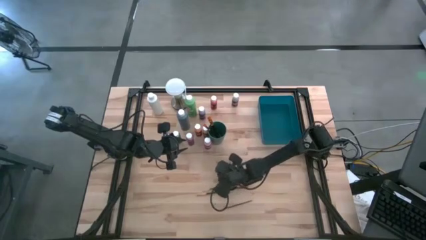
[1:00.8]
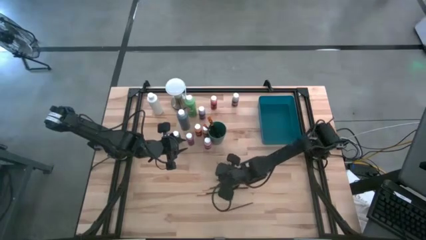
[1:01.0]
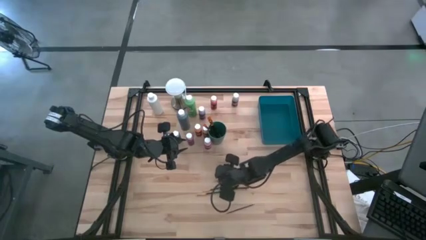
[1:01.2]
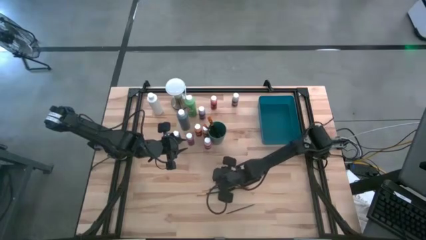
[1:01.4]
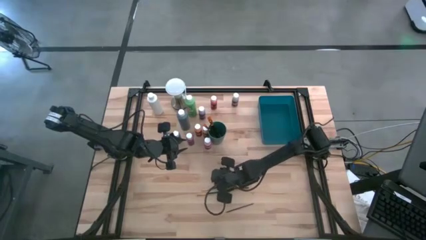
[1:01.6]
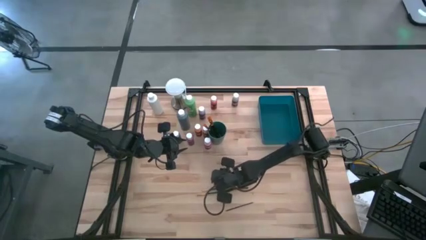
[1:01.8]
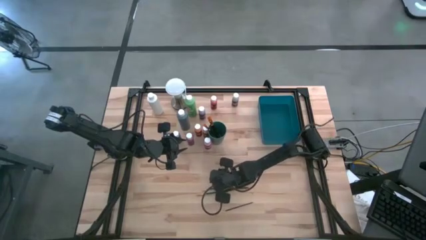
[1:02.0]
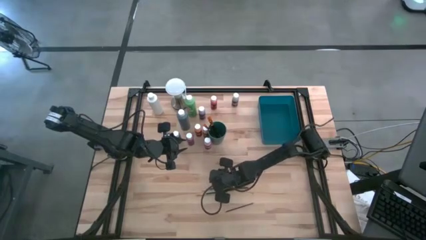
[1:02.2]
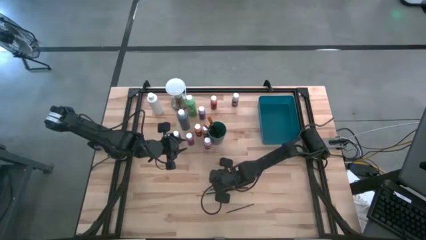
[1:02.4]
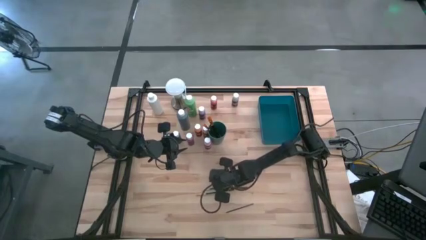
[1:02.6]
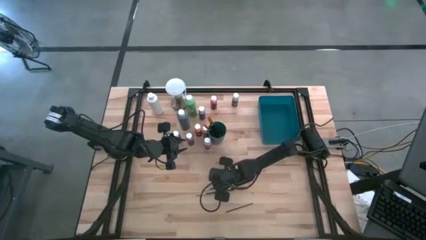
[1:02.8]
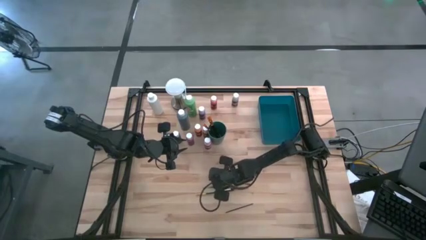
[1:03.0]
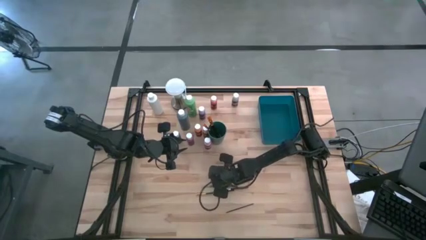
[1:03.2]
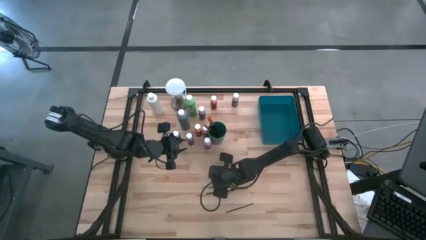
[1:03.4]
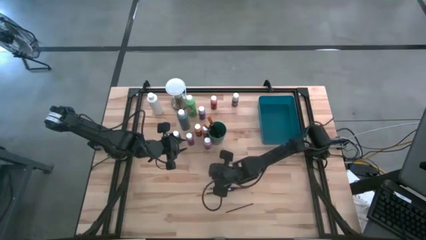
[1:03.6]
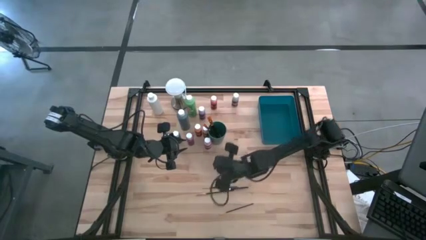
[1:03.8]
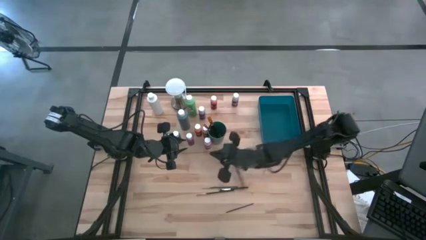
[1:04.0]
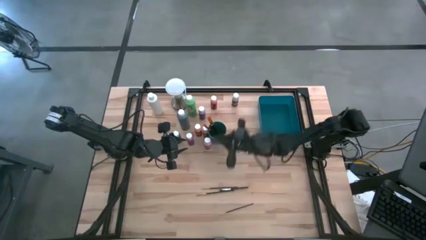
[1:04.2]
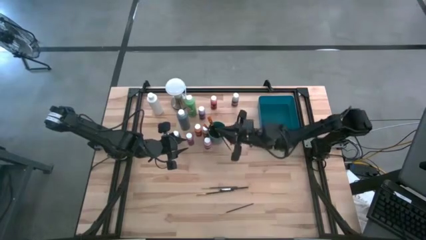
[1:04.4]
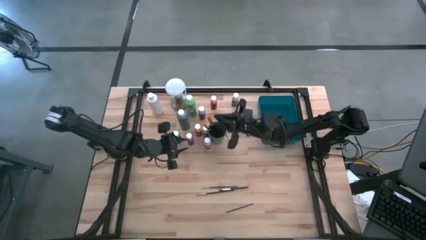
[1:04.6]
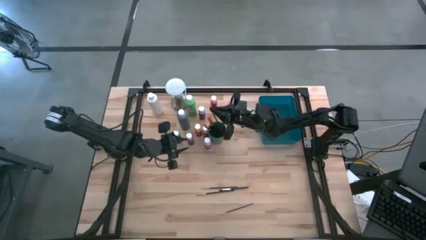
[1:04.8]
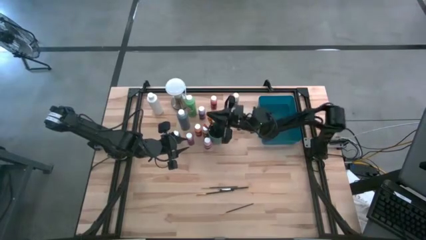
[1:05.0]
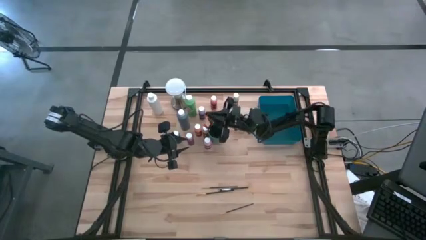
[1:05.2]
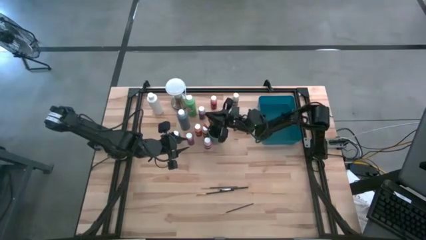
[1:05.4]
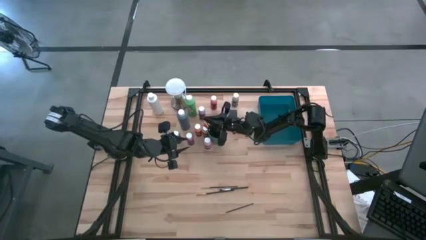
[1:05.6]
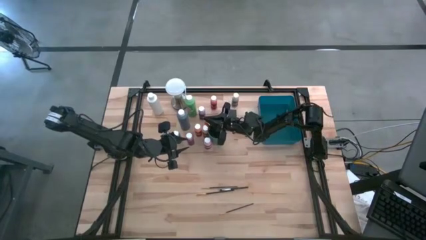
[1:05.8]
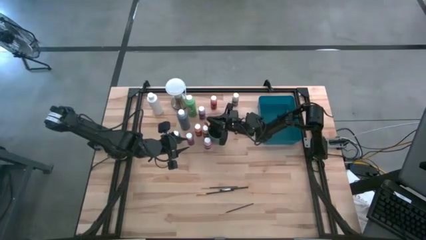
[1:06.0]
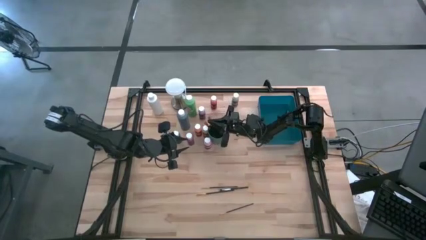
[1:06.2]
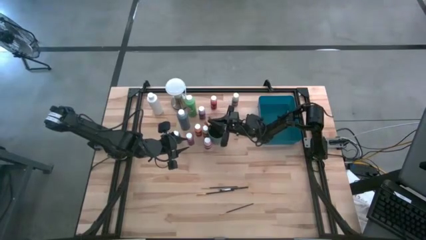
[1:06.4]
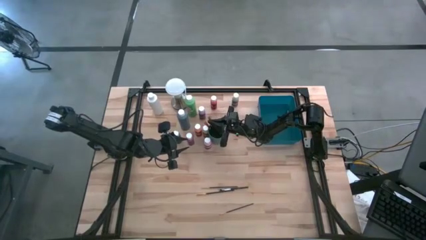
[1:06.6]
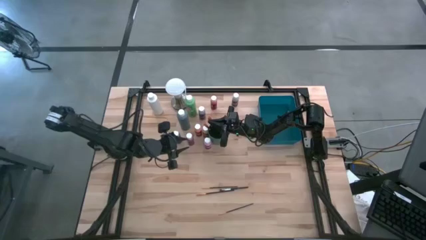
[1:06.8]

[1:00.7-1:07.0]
Task: Pick & Place Paint Supplies
Put the gold paint brush into the green cup

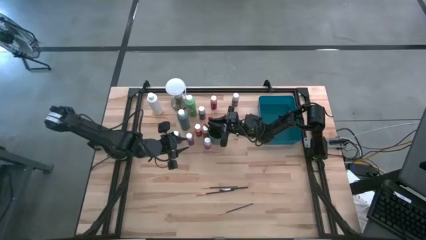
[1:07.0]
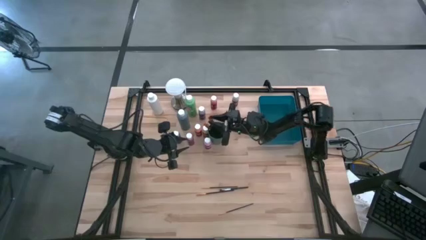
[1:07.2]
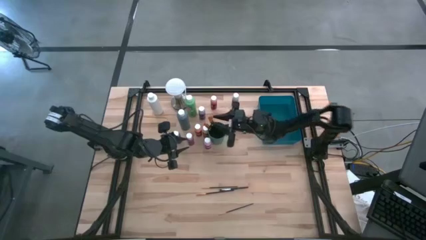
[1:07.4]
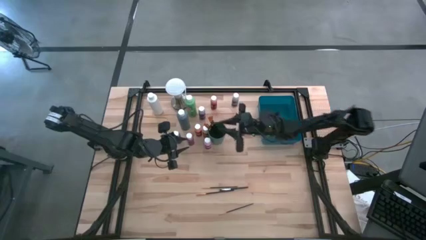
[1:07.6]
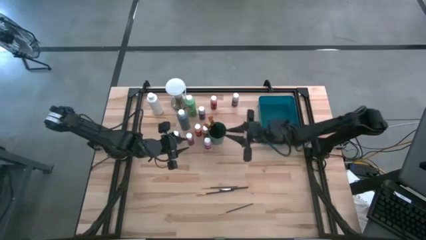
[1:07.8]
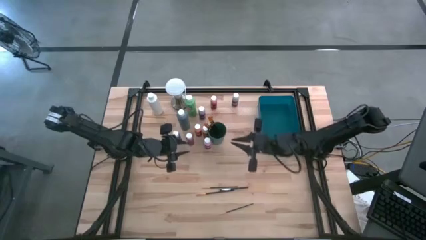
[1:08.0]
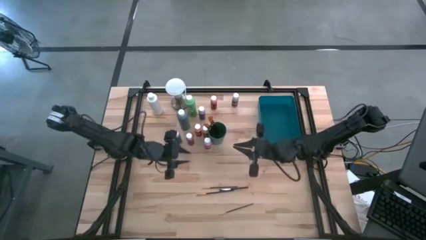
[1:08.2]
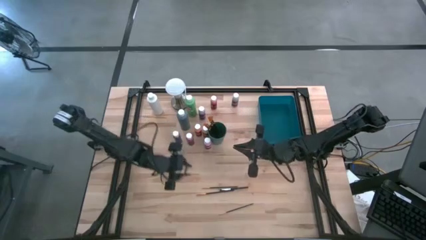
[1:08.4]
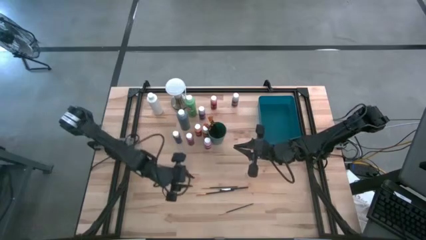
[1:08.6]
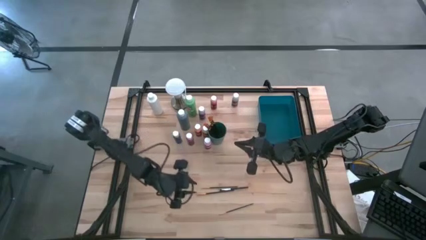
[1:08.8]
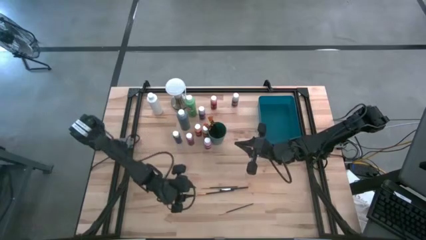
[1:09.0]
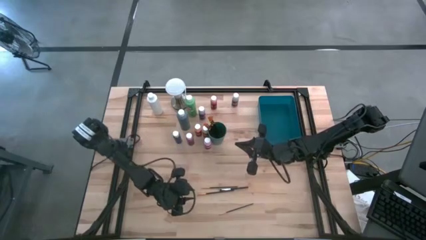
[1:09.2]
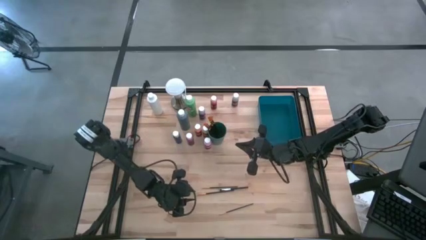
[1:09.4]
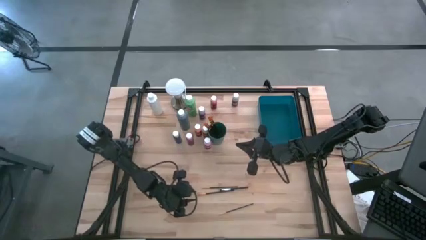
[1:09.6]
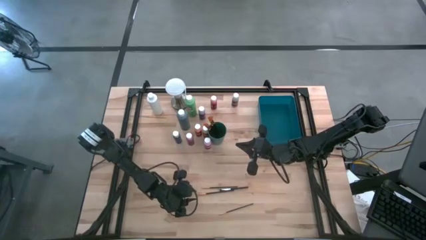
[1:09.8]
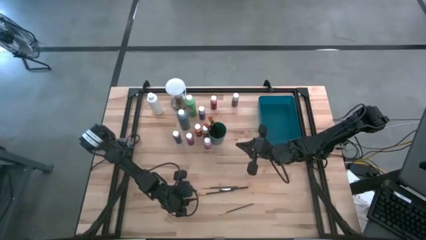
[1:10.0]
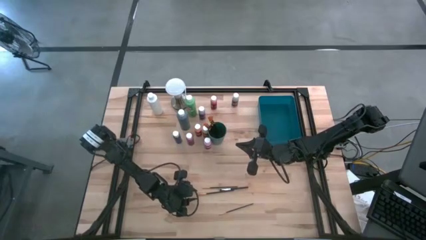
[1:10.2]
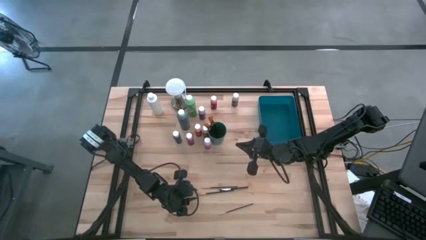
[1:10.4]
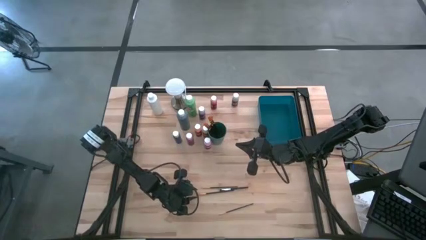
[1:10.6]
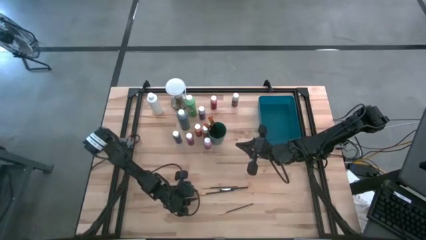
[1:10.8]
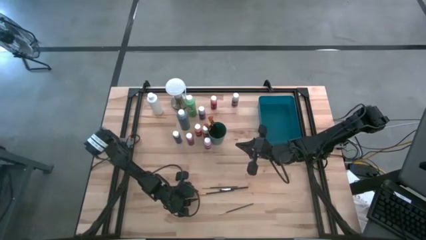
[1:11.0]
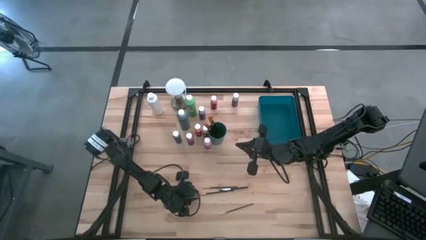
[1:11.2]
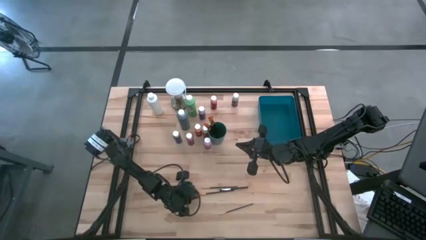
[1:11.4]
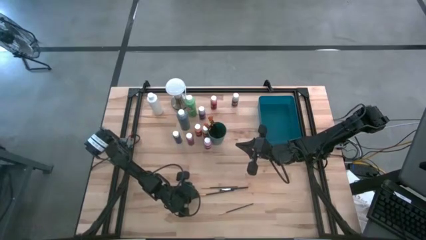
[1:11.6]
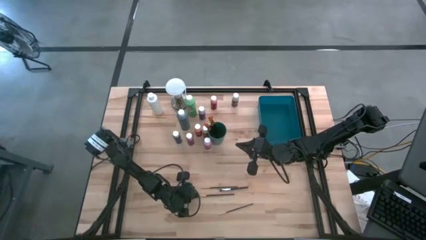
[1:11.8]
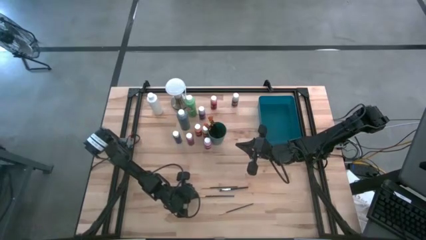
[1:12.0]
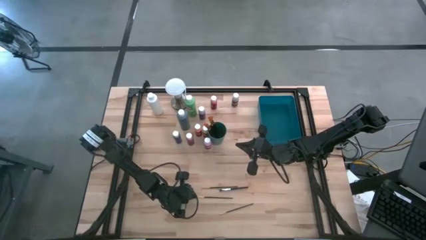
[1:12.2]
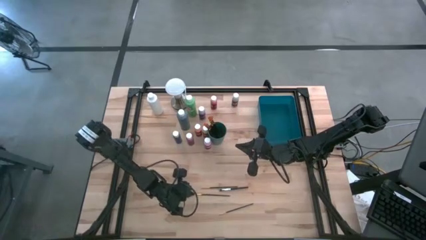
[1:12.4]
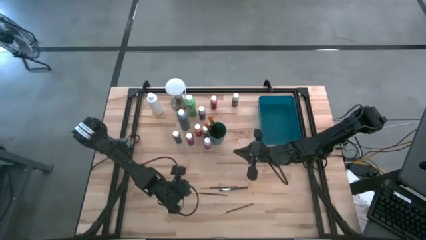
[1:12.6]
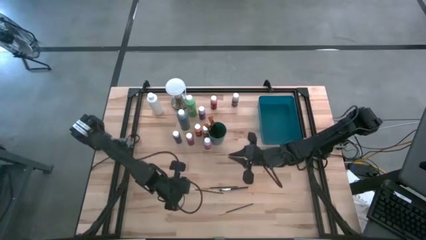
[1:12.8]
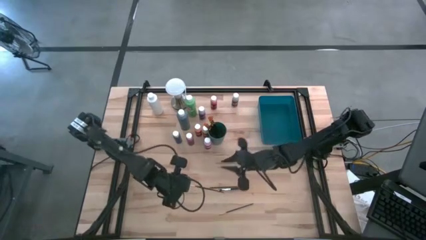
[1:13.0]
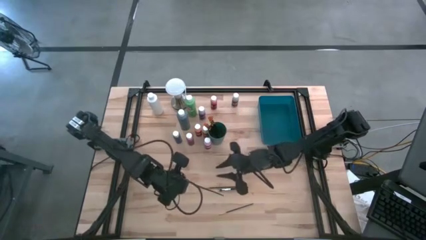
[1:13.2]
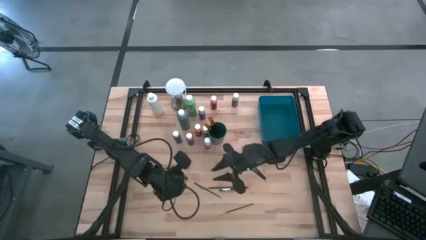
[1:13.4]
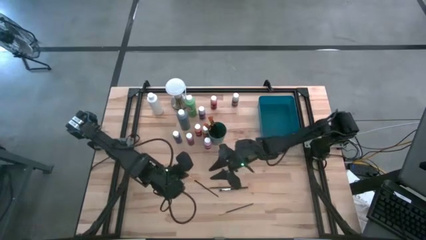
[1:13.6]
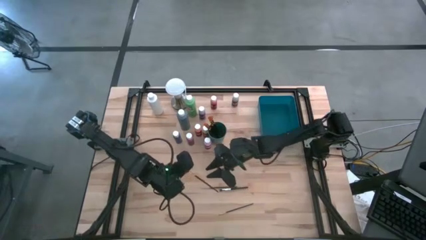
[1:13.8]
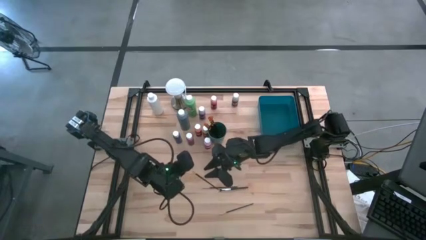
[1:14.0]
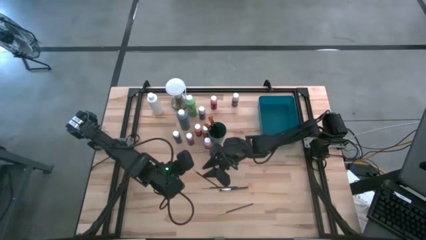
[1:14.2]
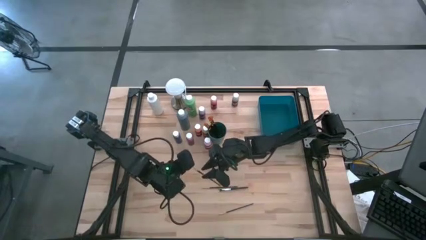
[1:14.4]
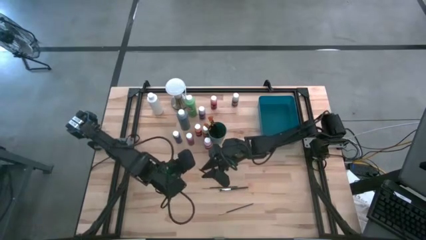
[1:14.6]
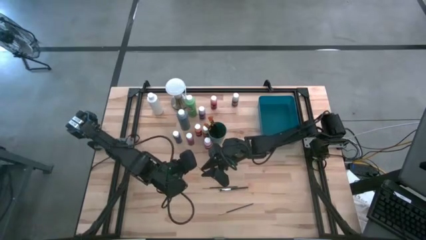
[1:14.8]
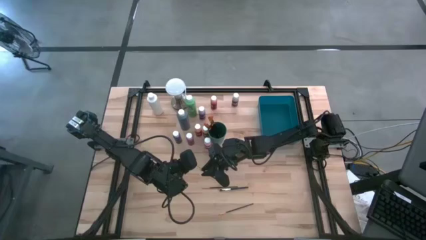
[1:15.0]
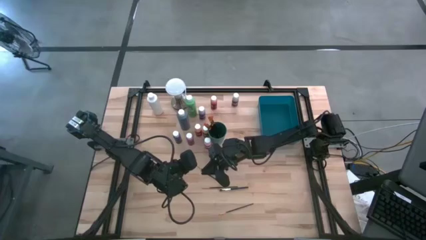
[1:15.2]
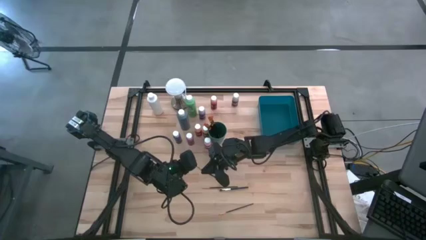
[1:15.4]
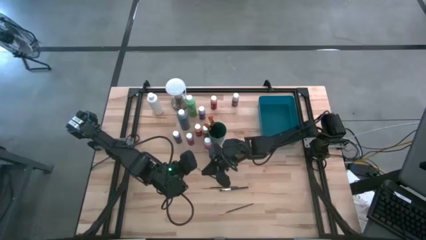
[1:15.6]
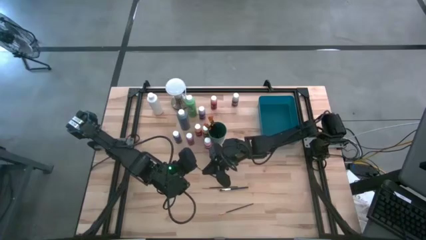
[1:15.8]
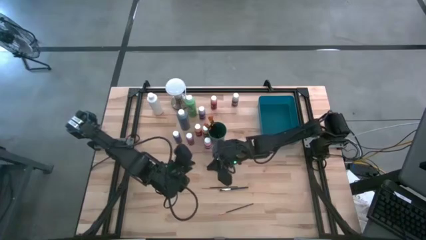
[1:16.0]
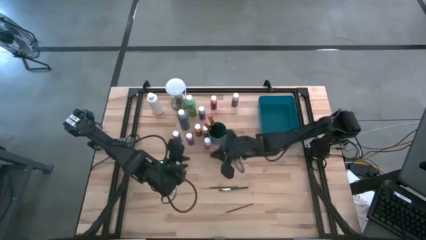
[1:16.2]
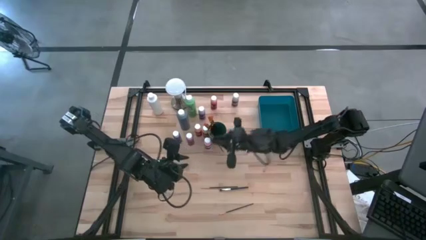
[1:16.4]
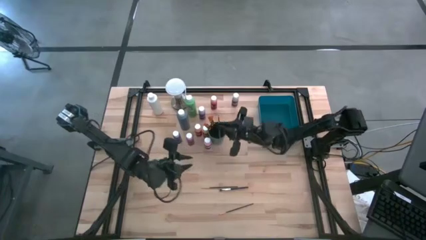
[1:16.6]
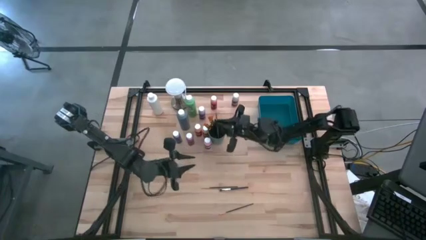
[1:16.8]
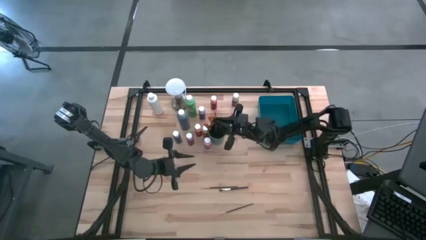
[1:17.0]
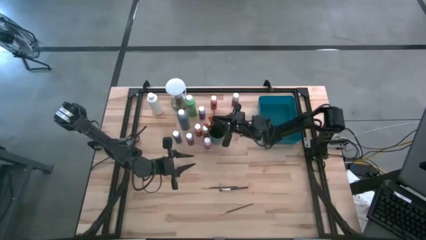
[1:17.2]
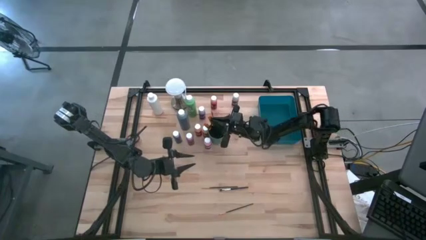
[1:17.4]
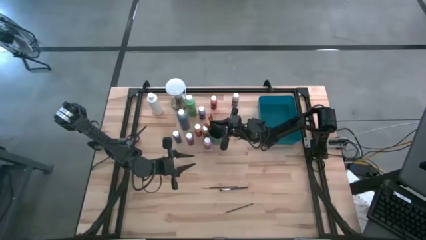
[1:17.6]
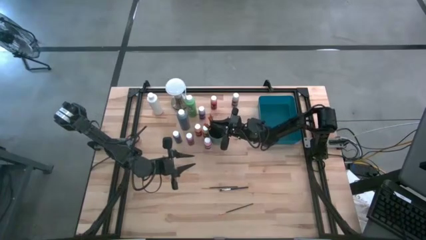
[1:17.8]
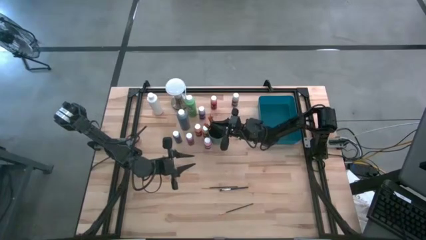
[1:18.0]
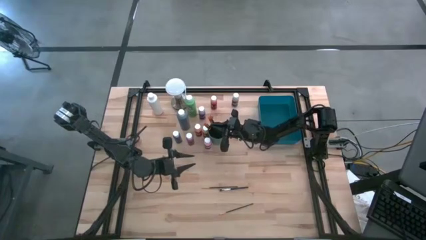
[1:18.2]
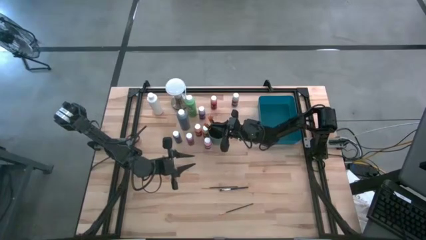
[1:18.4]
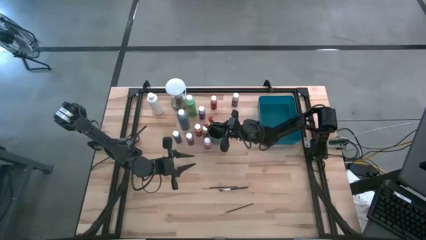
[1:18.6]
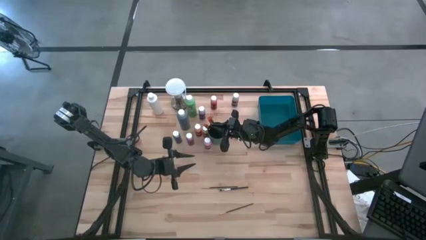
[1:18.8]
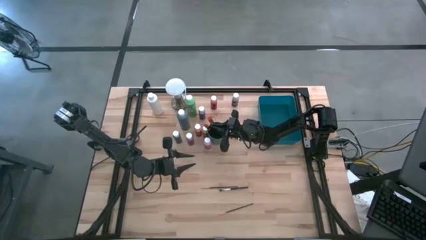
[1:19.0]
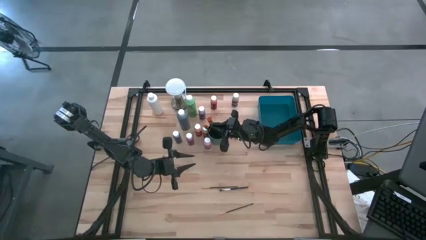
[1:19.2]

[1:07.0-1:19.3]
Put the gold paint brush into the green cup
